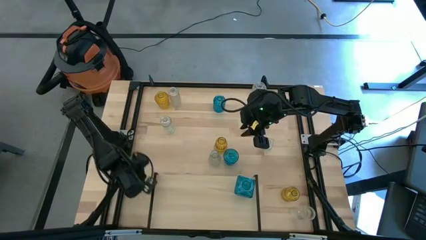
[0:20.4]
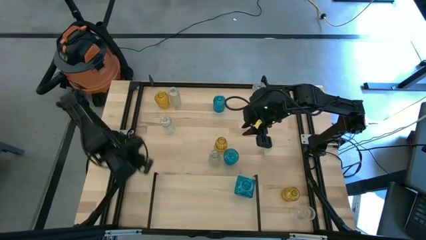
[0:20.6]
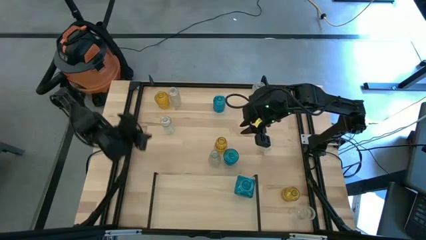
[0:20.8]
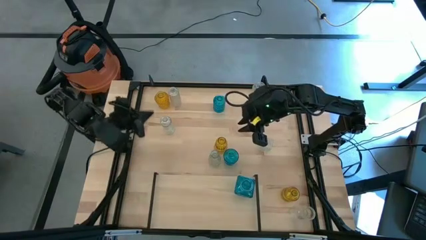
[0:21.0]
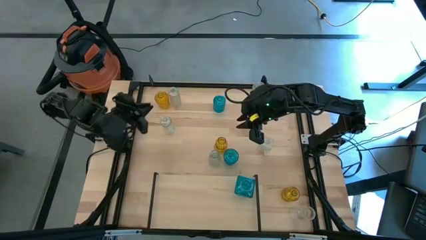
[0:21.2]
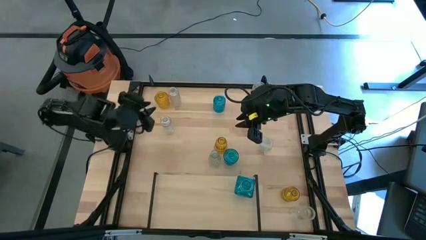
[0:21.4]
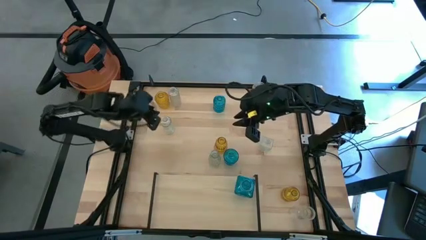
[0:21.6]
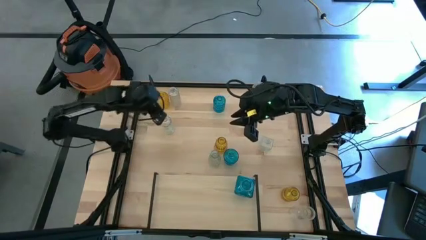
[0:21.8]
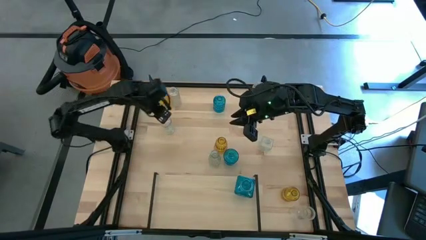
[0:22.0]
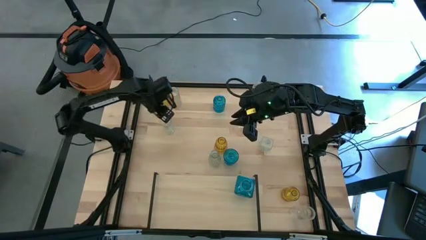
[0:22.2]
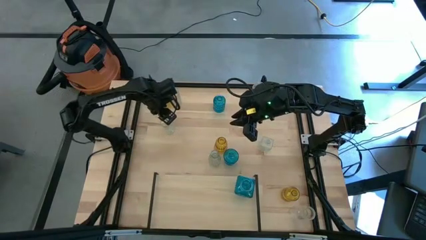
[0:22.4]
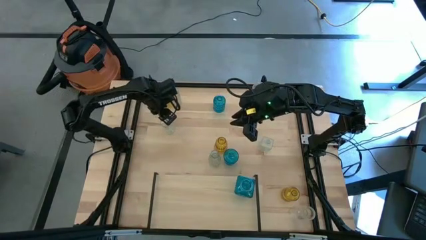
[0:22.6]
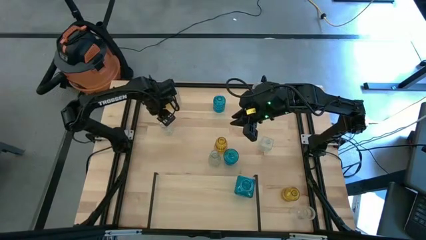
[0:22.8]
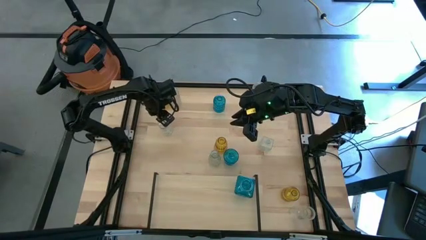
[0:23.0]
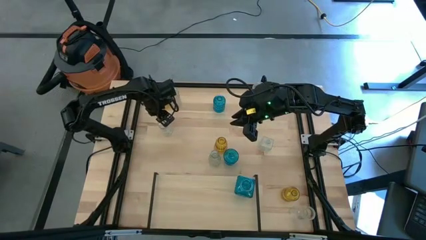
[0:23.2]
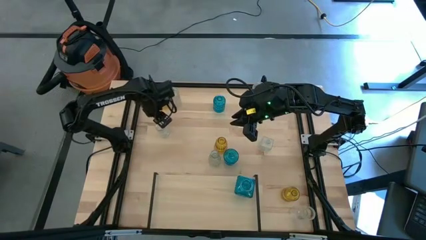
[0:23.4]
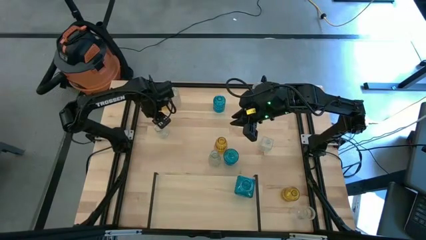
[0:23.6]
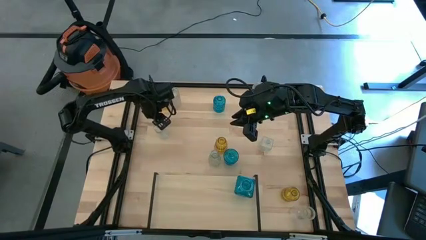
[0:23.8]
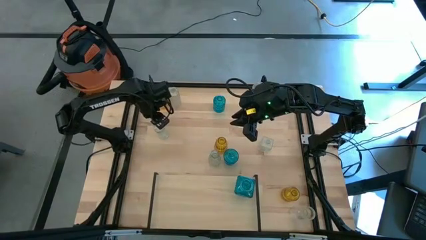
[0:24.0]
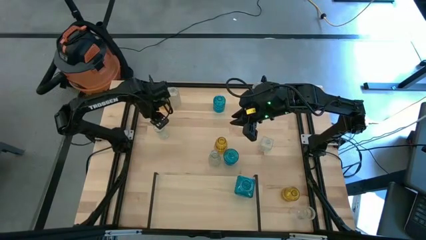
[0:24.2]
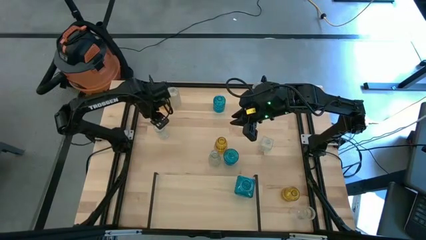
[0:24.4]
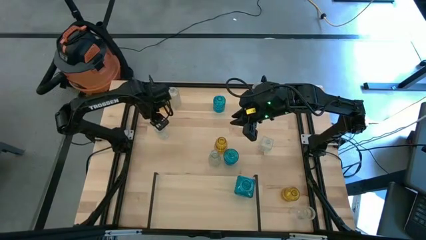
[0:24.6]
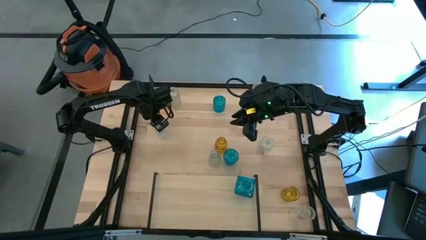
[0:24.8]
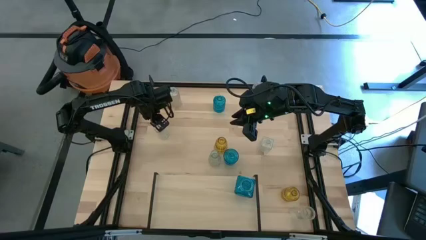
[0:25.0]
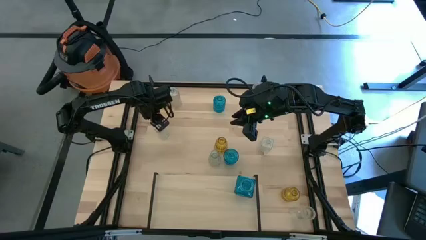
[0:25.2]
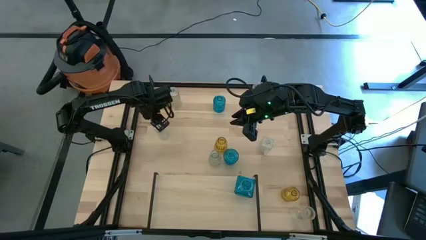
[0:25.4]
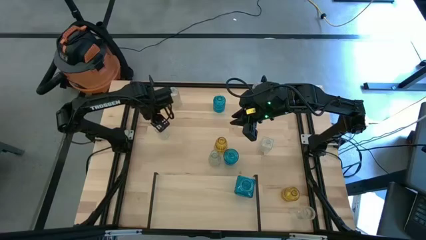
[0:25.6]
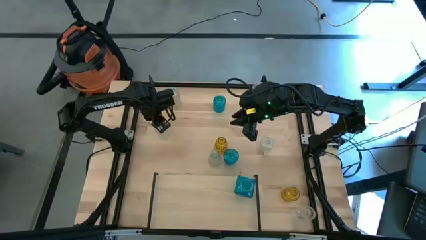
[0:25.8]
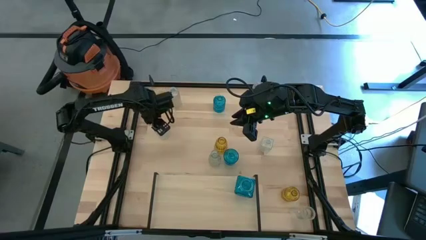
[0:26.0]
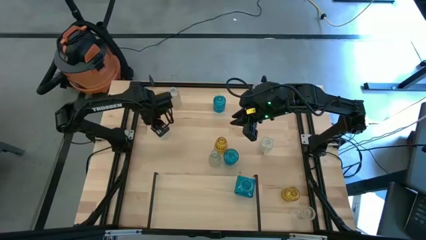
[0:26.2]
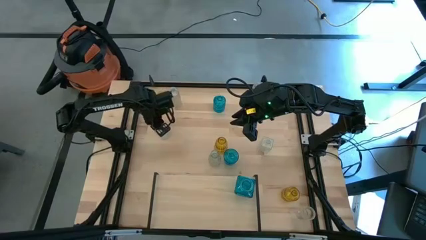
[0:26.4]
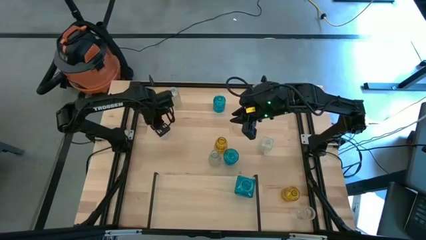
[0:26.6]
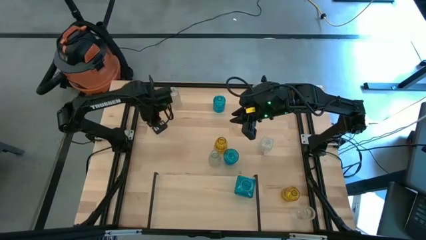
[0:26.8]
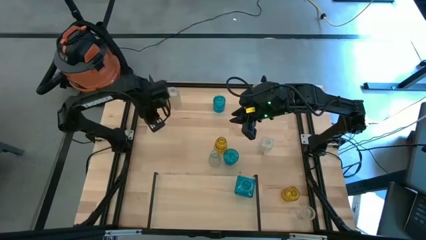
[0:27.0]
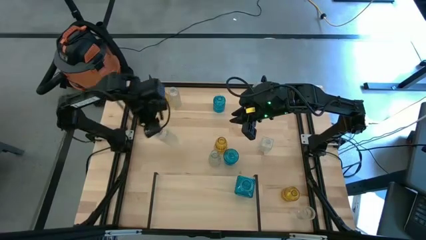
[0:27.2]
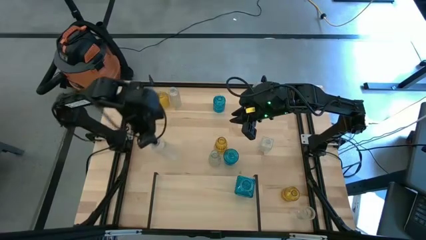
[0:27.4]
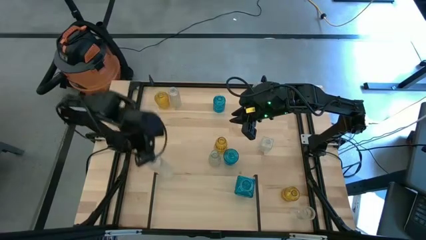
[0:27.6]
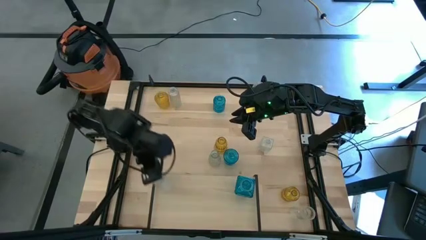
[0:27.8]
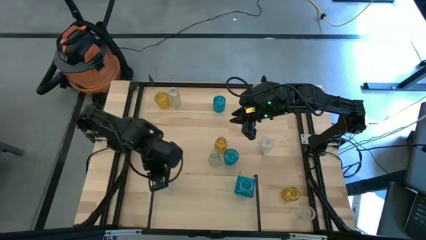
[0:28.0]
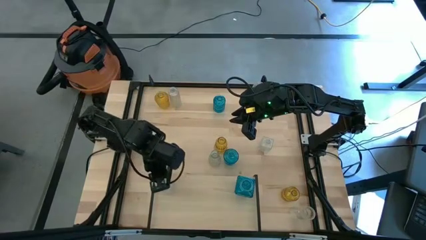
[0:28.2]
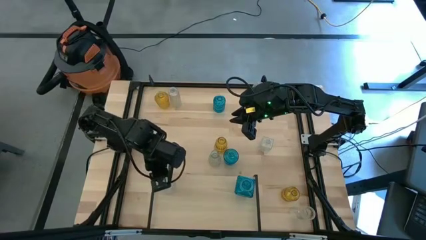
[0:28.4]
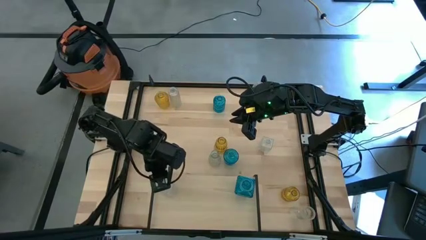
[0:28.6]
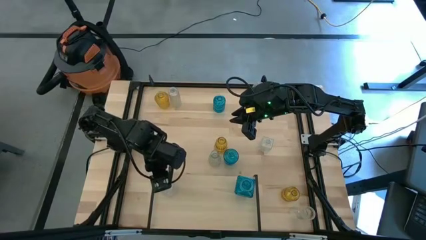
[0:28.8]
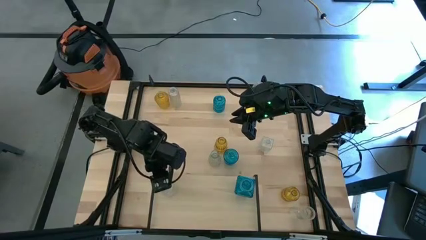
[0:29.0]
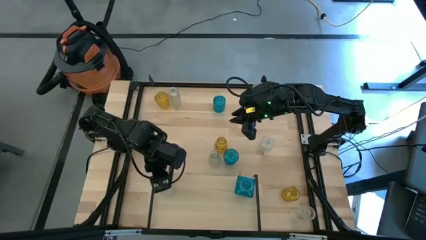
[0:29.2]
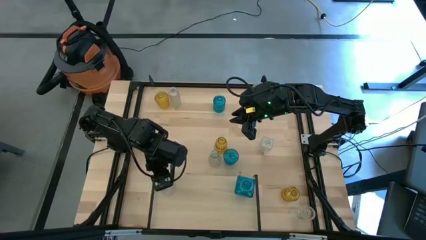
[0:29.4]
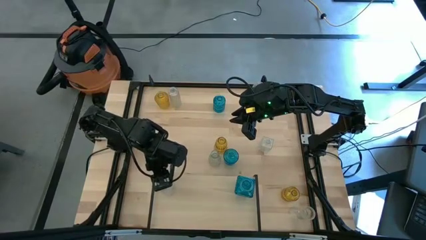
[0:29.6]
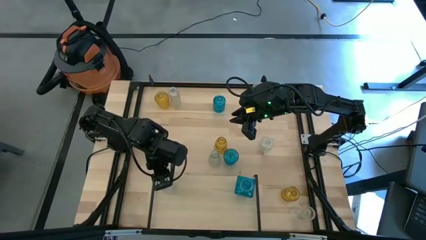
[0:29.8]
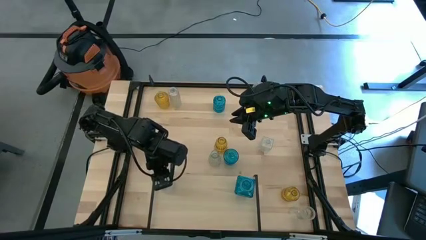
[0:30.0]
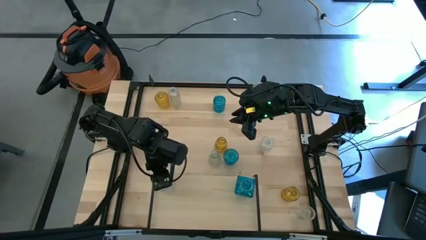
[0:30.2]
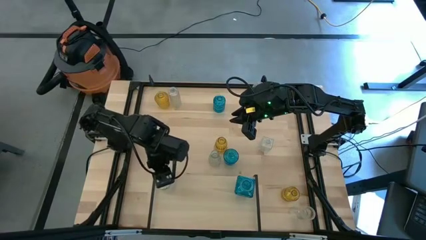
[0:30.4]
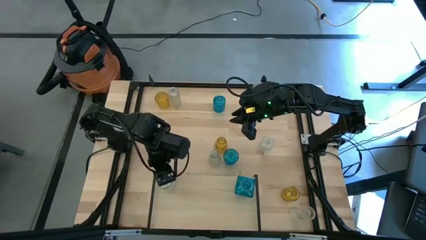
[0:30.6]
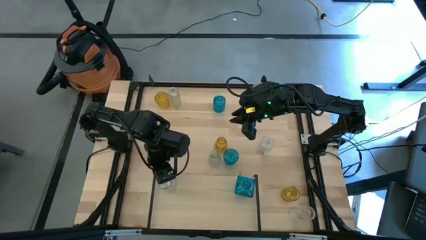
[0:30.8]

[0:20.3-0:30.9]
Task: sort vases onto shelf
Put the transparent vase on the shelf

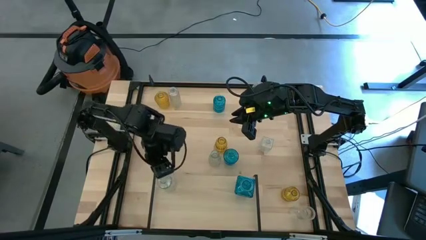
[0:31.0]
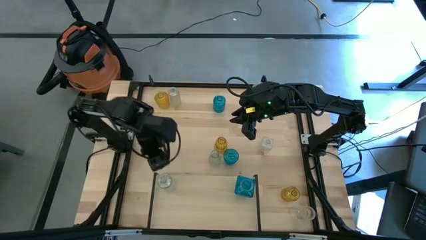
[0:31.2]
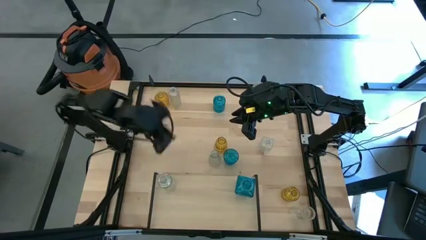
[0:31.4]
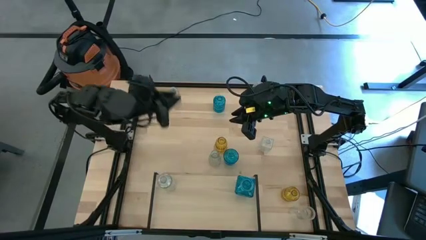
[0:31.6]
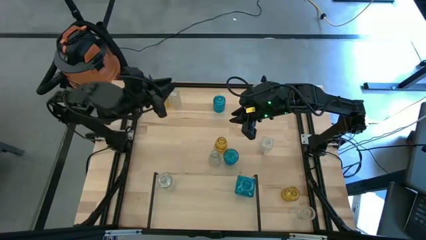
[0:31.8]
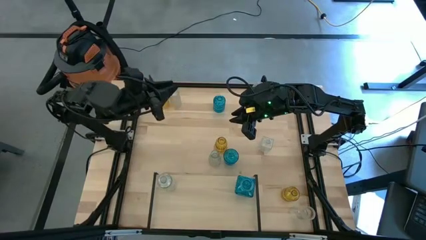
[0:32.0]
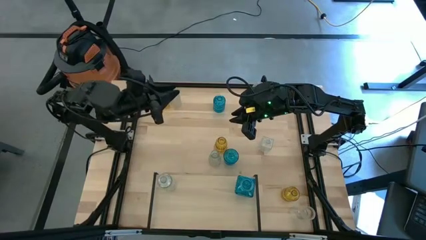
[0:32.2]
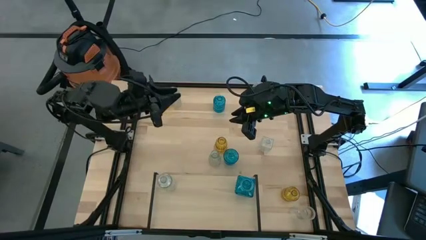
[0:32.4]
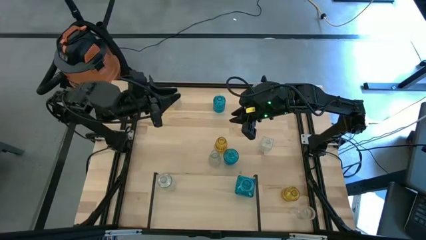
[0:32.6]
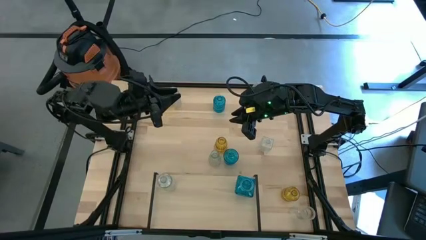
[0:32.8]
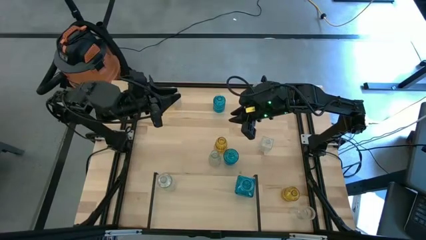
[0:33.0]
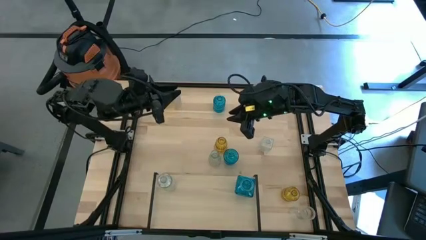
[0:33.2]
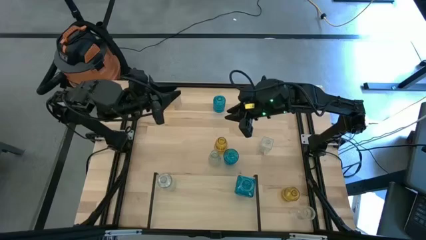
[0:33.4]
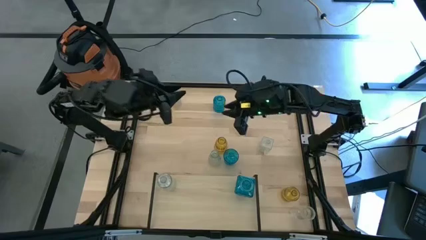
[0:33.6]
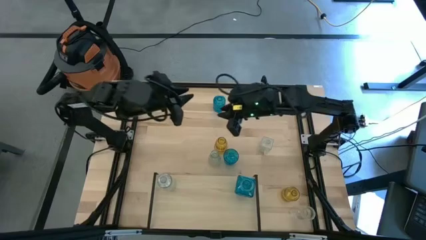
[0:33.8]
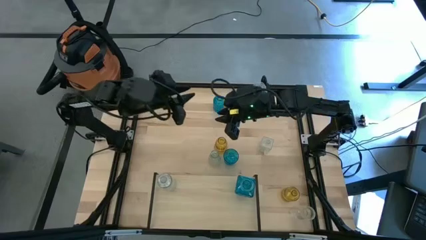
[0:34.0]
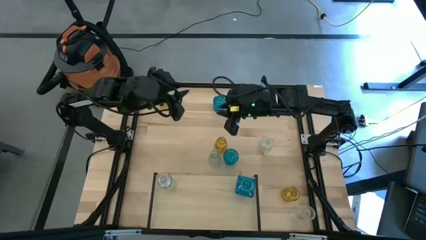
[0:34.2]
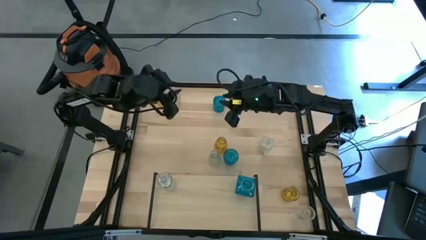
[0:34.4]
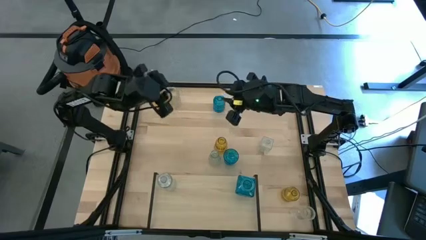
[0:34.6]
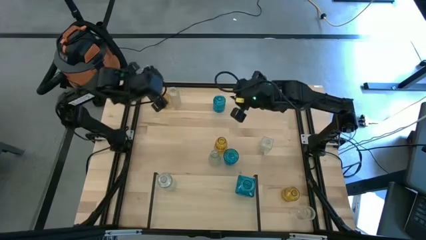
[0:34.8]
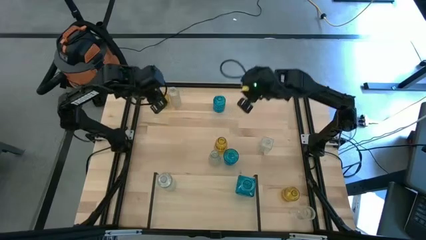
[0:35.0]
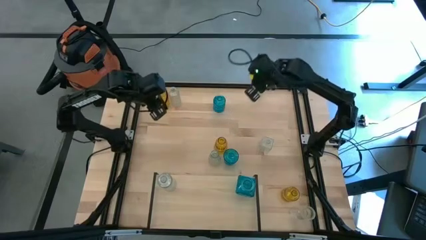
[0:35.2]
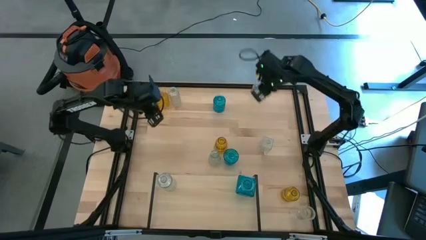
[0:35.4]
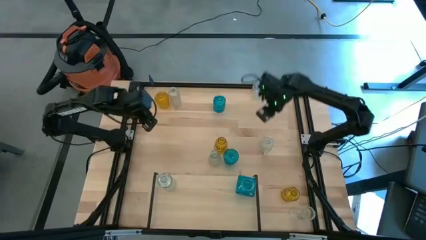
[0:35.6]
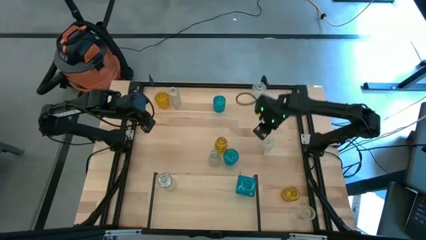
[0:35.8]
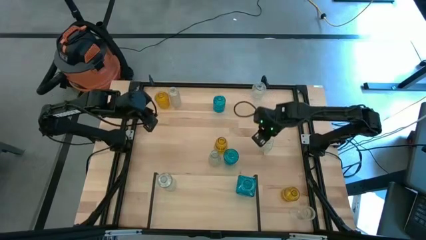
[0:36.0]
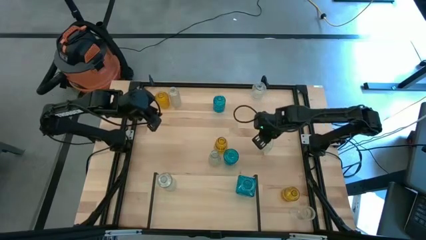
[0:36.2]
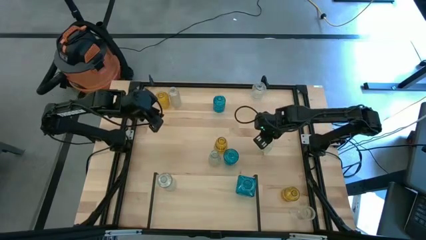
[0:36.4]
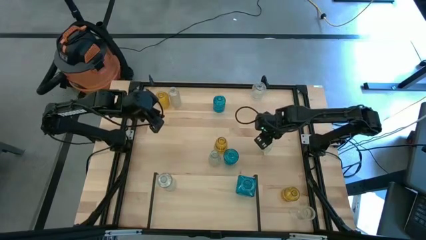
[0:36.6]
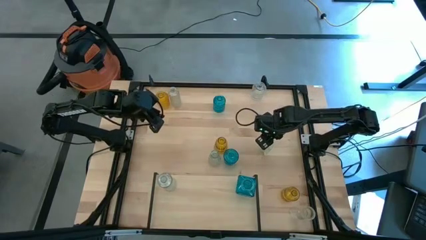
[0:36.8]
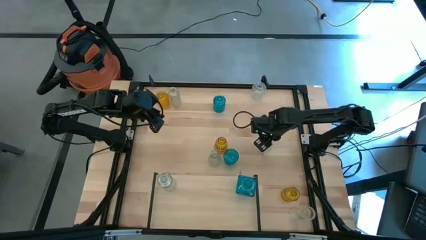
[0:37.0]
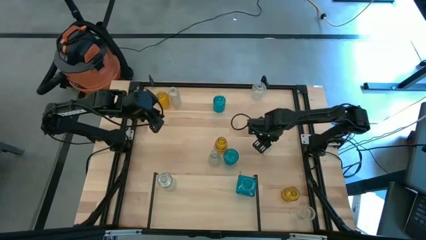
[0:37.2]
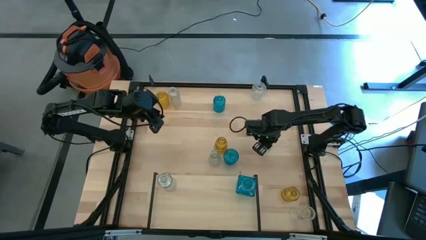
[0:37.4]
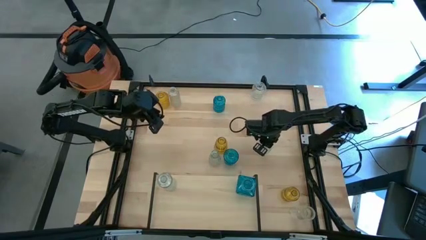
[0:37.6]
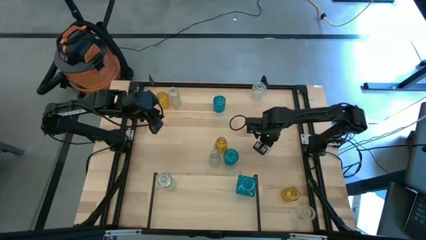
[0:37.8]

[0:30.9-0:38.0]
Put the transparent vase on the shelf
